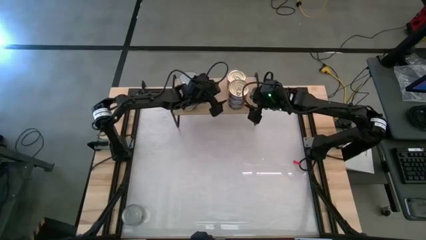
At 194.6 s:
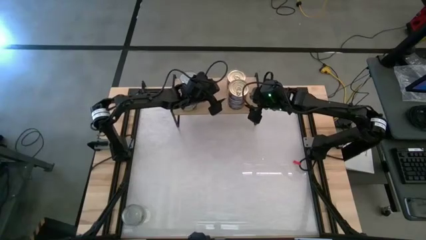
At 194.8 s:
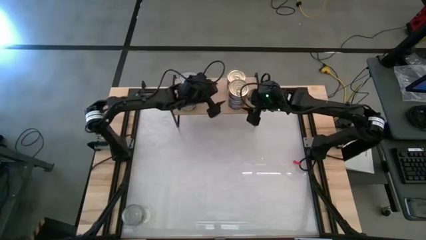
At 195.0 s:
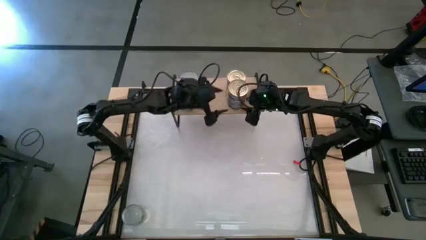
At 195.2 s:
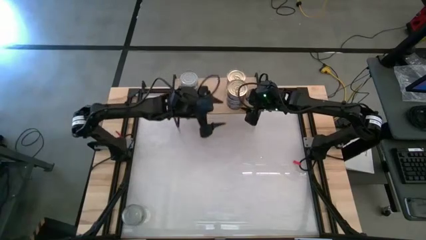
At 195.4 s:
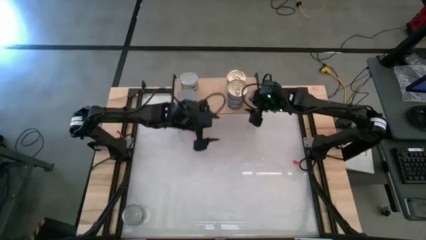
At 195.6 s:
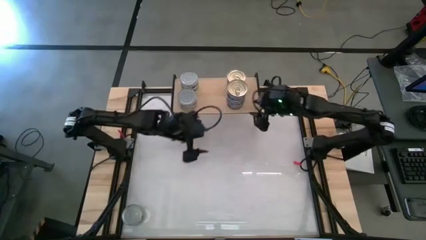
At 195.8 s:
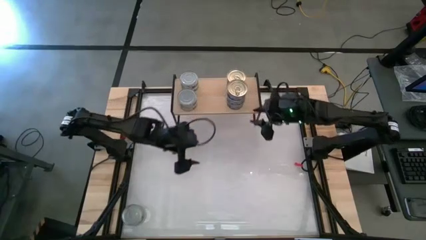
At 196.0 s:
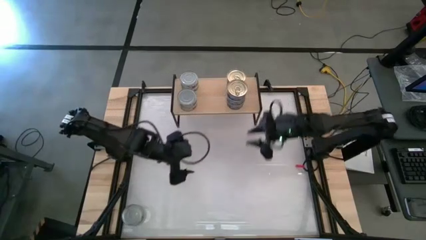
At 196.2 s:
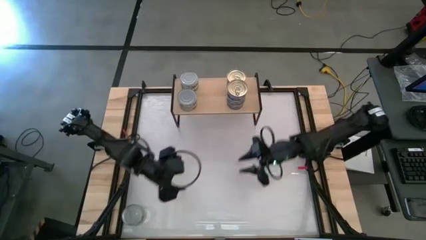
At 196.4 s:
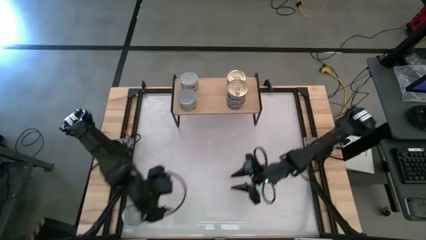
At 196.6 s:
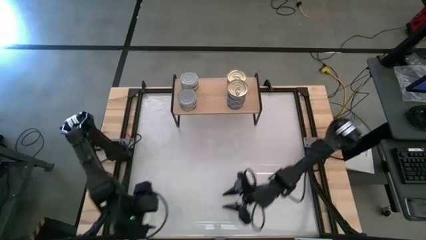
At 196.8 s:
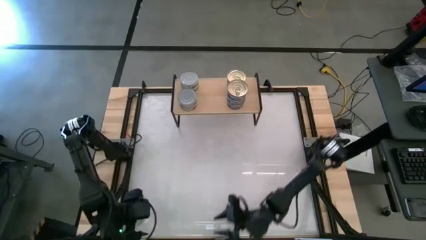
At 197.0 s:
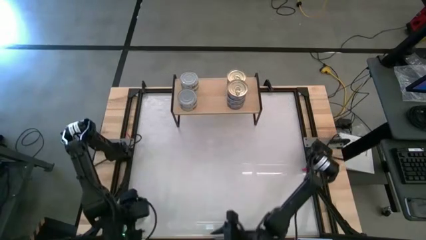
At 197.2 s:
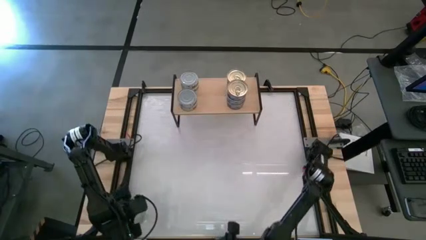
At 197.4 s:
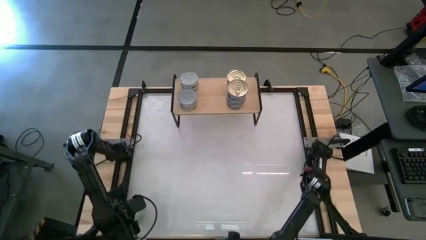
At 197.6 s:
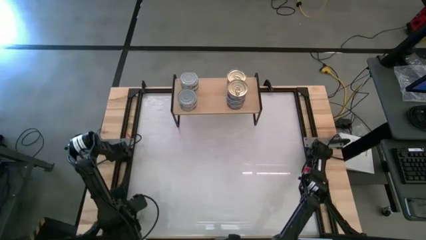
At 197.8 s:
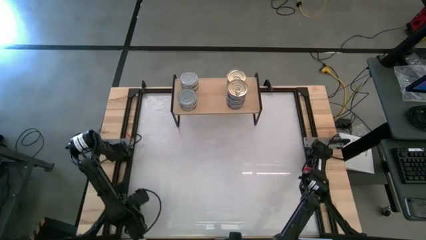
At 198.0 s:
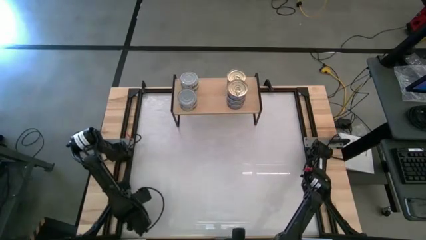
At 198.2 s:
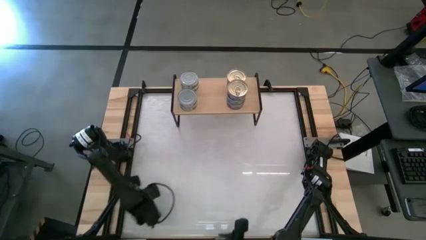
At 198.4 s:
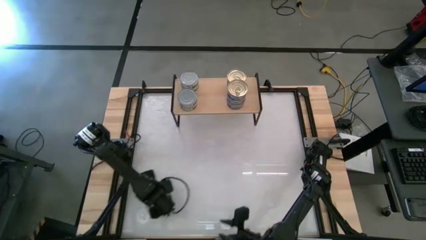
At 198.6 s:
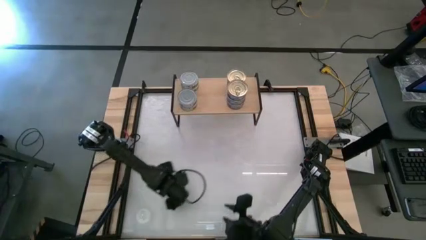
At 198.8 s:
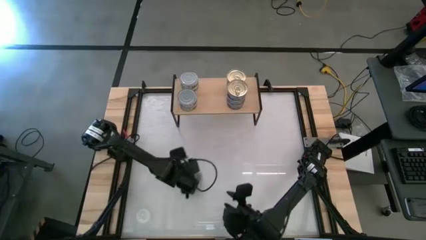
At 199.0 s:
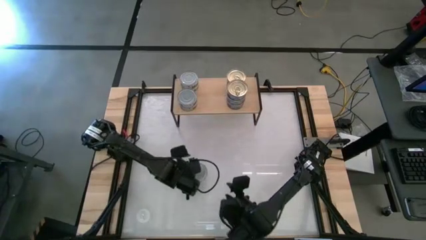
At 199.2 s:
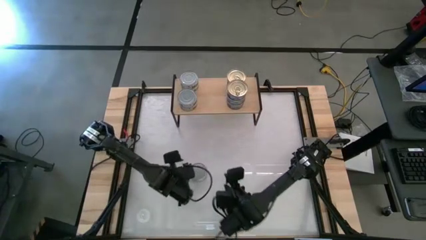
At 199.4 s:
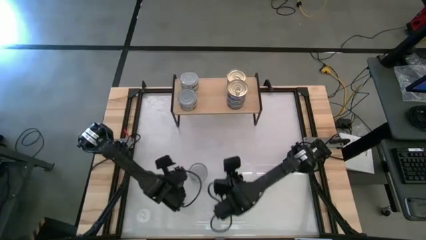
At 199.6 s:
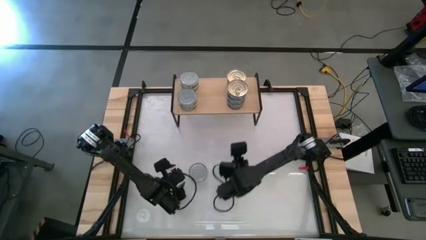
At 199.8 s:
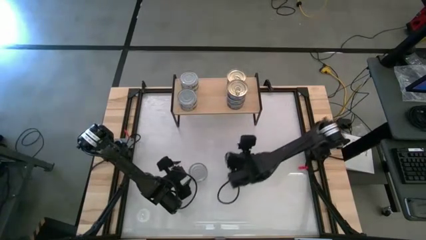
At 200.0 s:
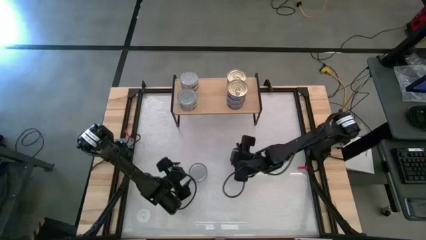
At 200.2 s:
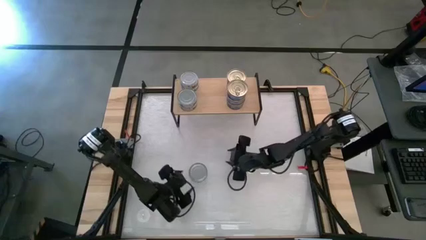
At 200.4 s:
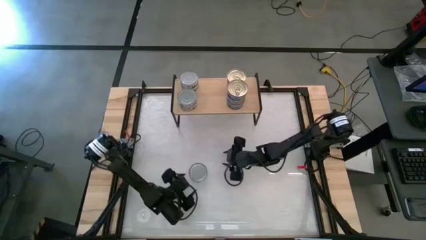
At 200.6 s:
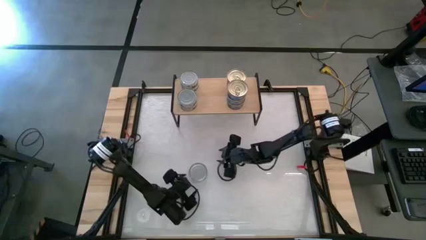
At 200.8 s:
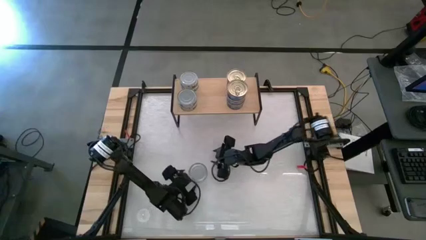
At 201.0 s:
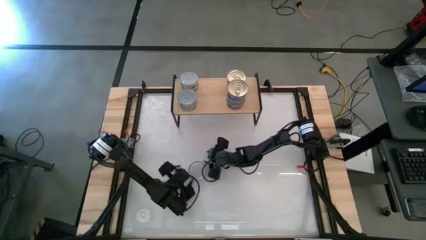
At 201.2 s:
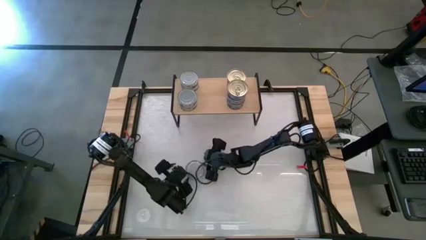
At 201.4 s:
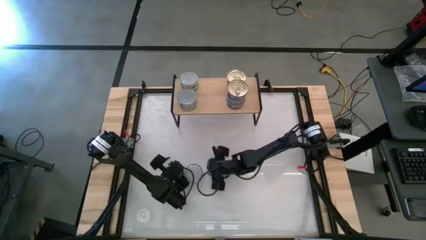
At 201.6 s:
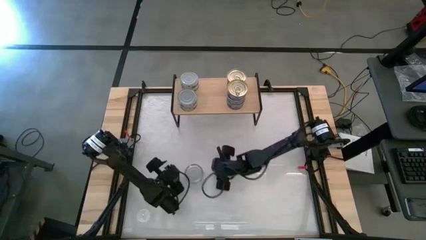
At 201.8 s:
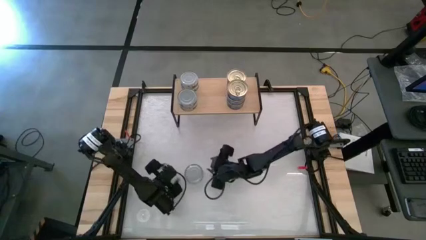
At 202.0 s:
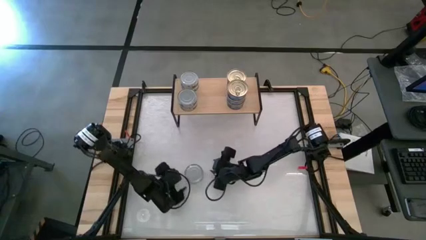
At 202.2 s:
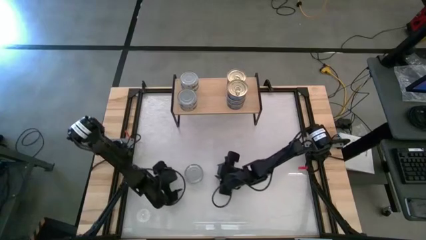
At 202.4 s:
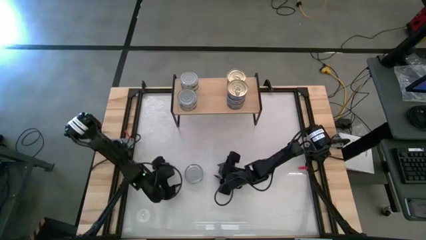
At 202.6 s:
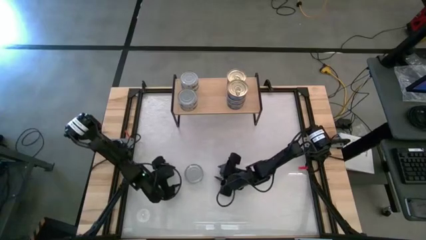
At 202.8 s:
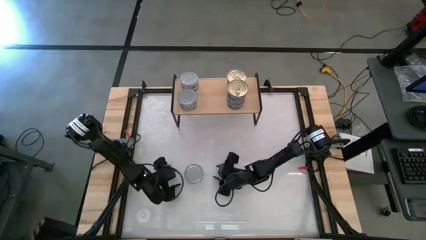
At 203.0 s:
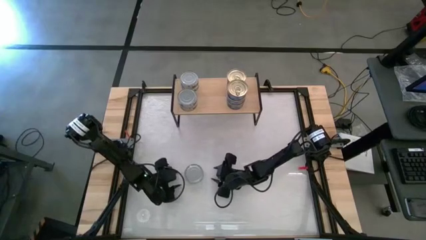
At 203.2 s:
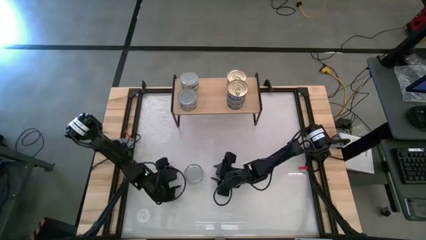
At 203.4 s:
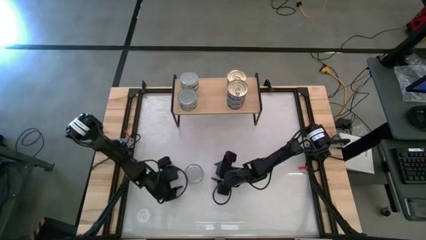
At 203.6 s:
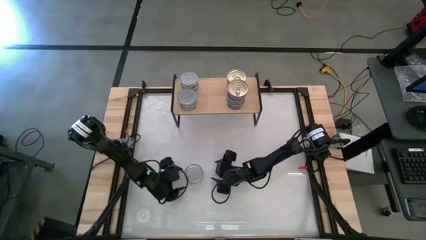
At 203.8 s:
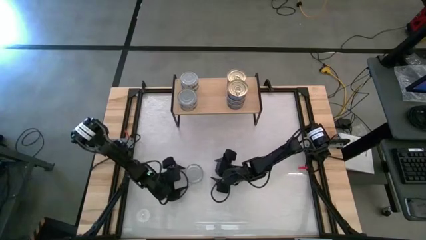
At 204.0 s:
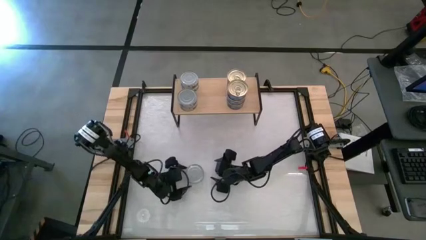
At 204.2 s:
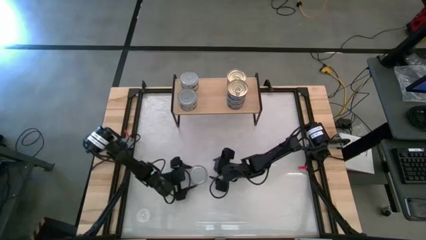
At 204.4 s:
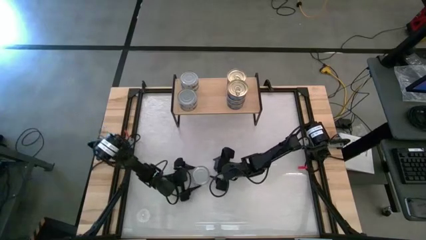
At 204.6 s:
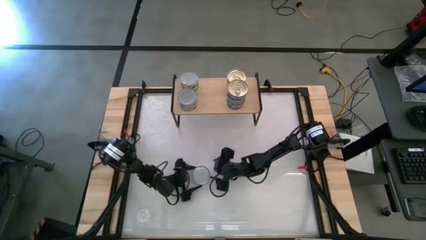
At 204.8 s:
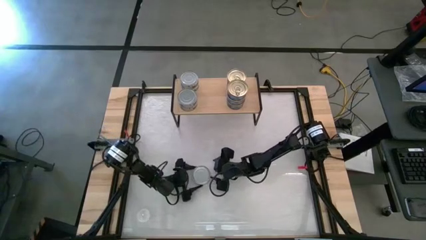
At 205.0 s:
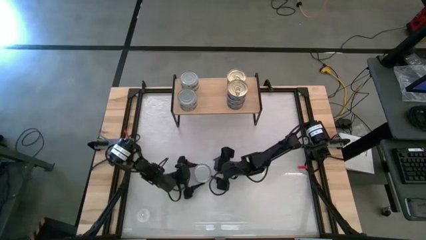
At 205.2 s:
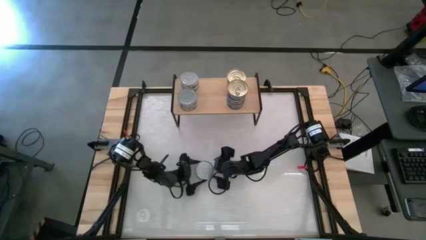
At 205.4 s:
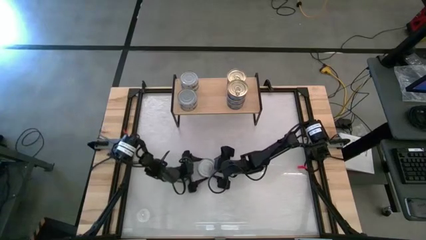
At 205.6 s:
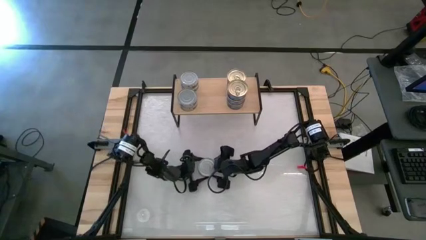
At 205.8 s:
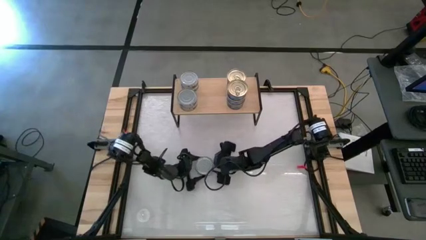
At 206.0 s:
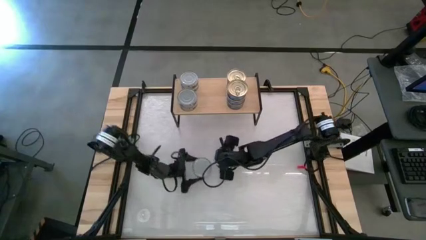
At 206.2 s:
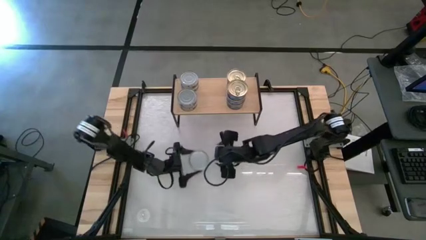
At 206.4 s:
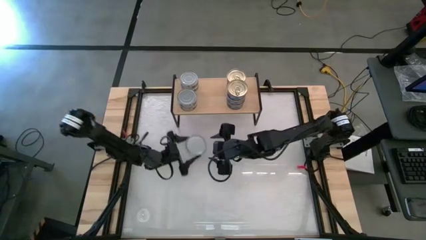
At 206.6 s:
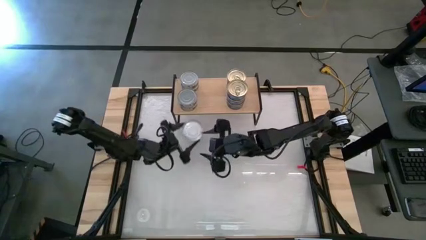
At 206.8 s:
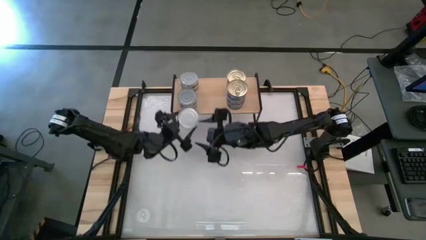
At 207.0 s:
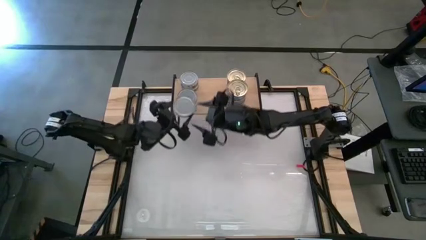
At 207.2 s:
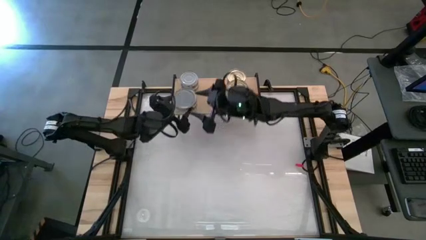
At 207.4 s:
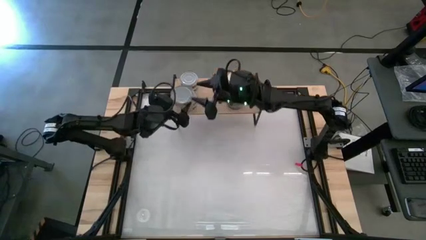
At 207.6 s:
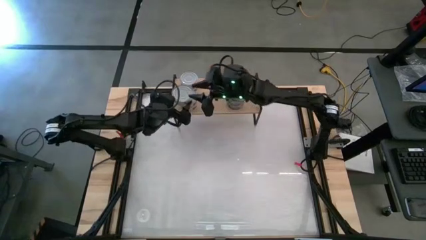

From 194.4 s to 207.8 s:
Task: Stack canned seafood by type on shelf
Stack the green tuna can on top of the green tuna can on the shelf
